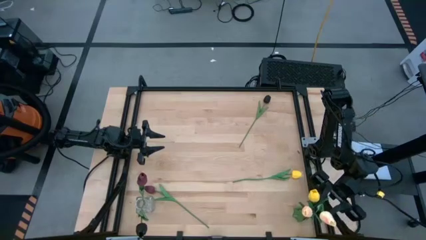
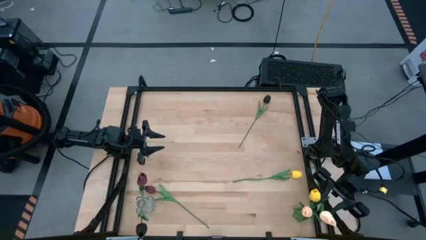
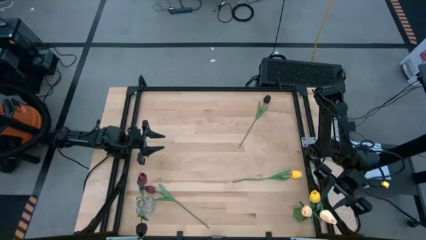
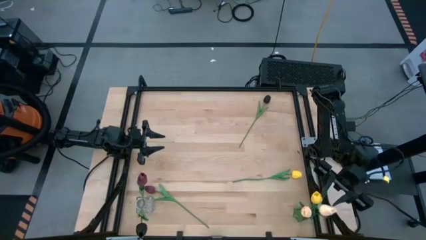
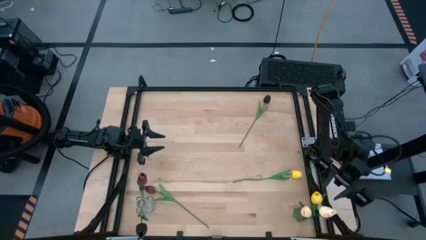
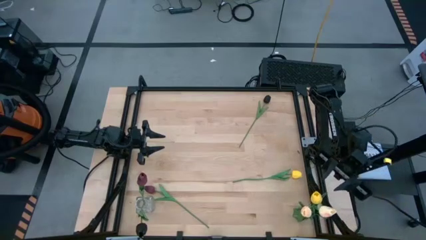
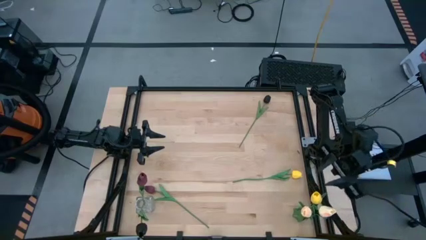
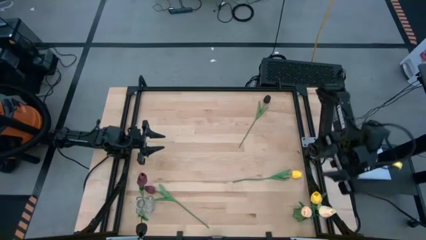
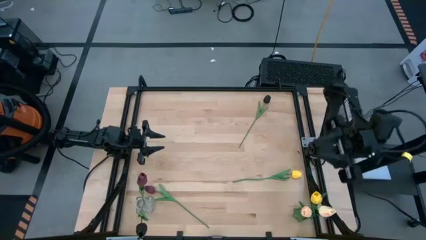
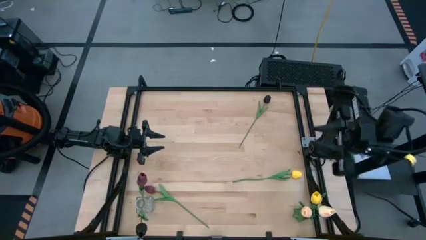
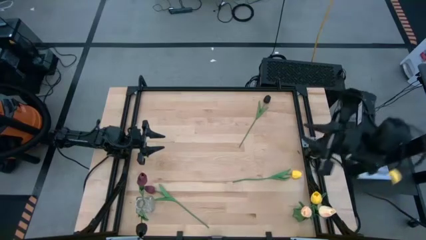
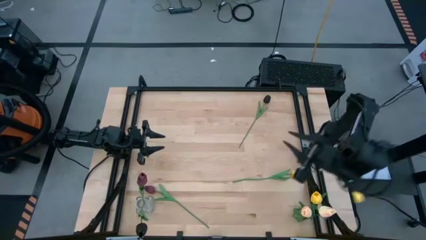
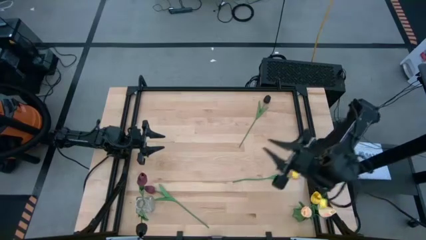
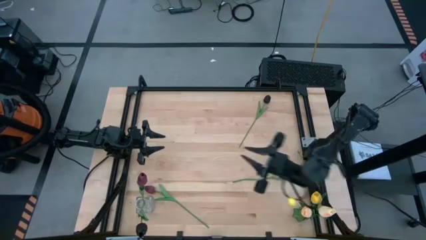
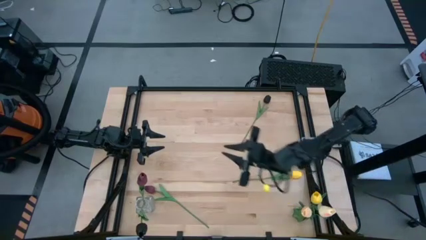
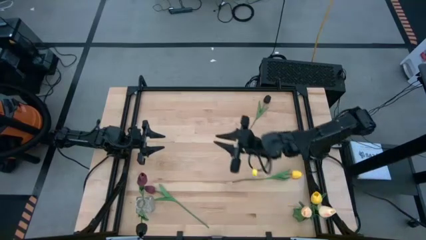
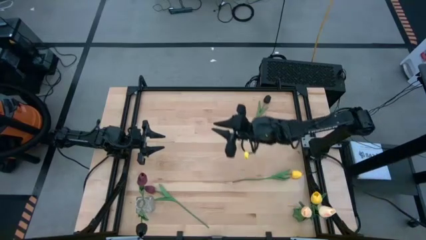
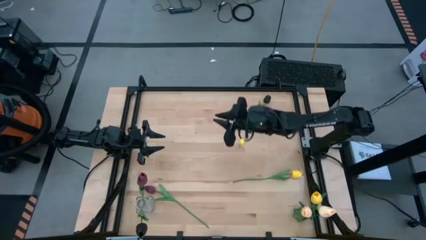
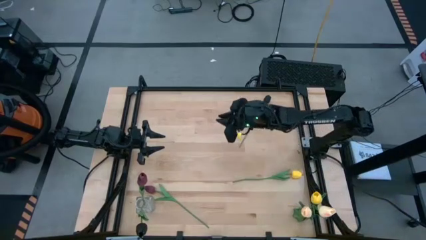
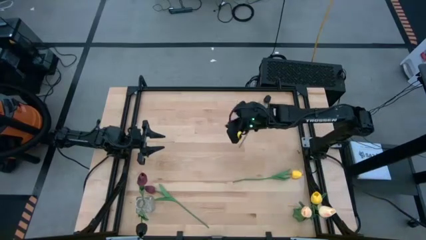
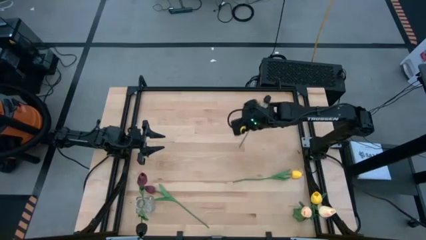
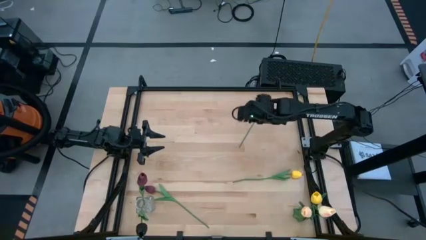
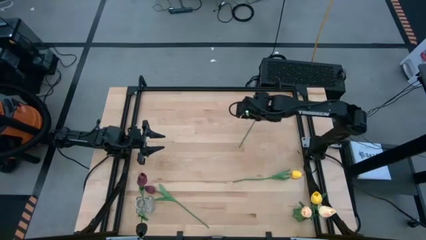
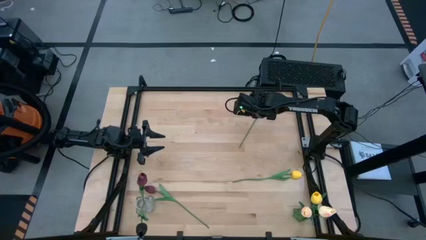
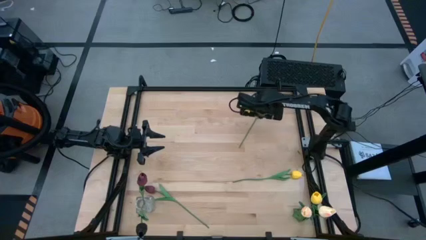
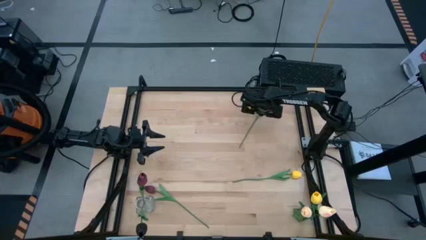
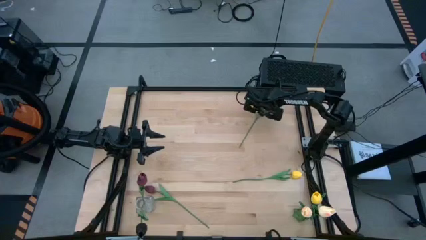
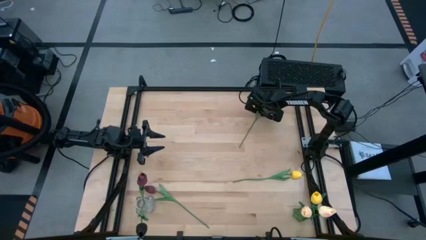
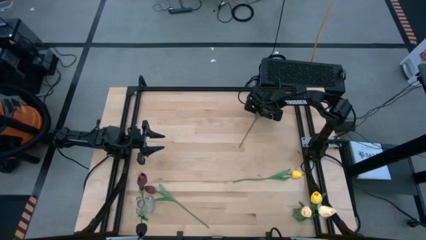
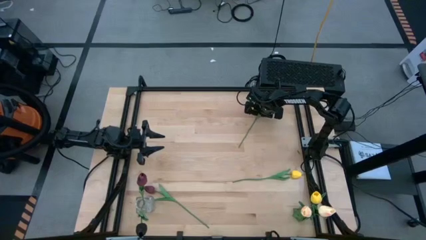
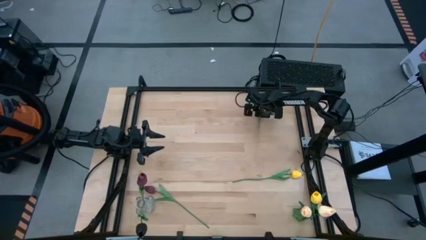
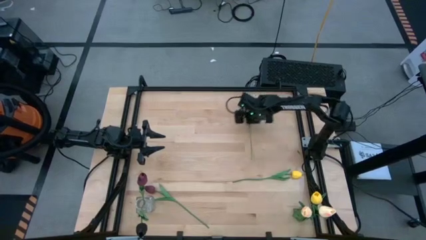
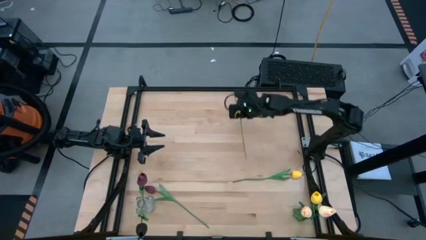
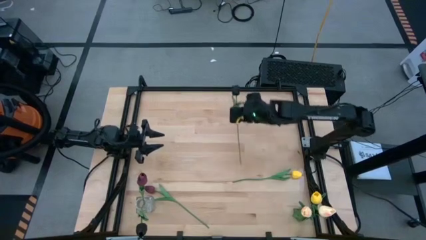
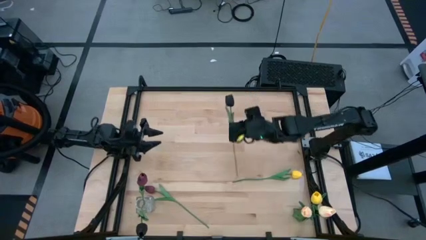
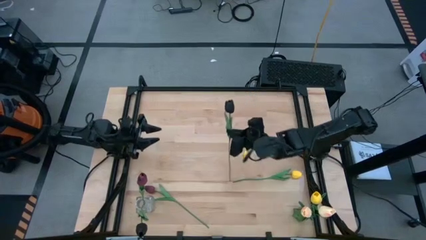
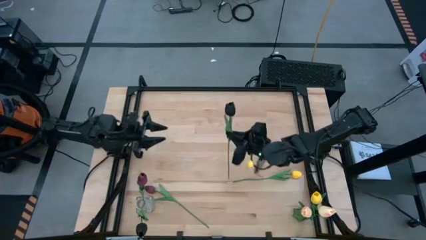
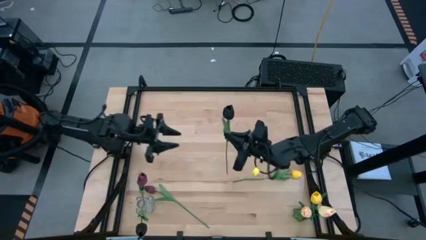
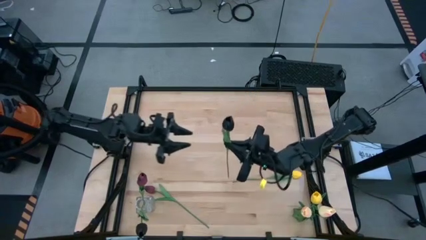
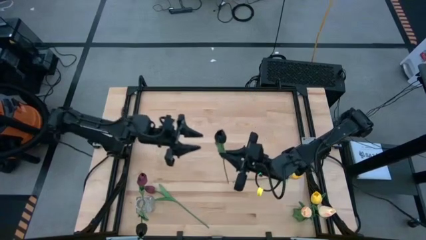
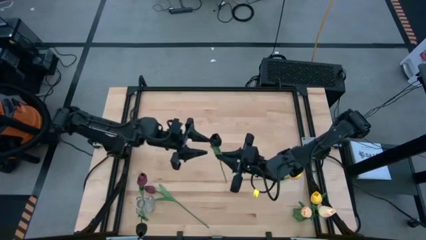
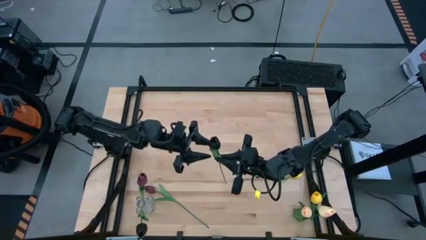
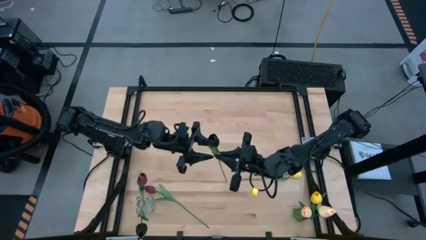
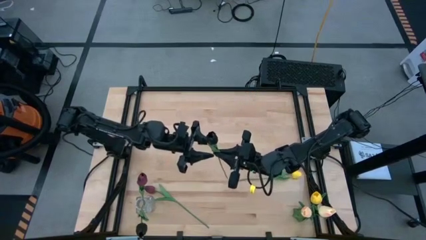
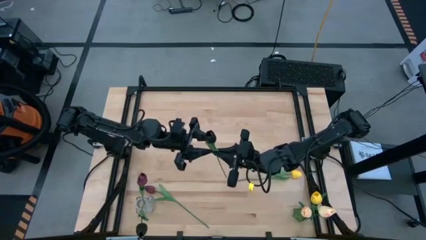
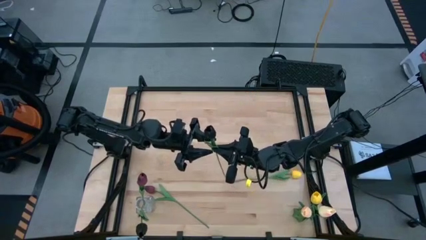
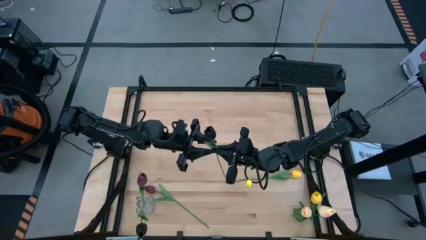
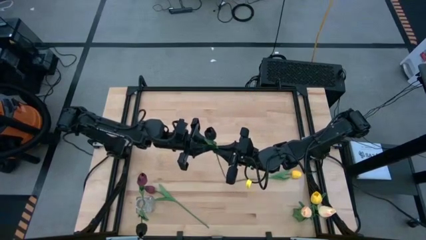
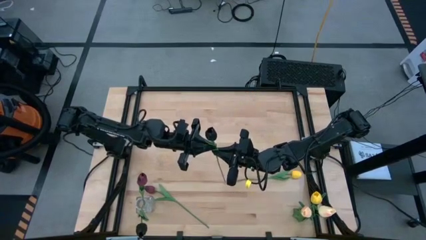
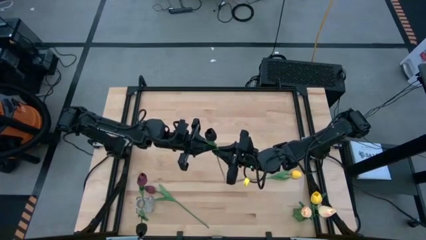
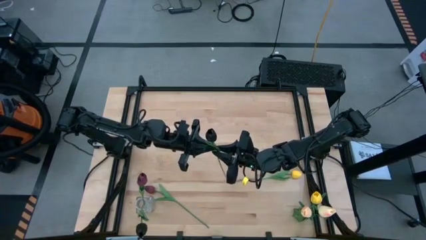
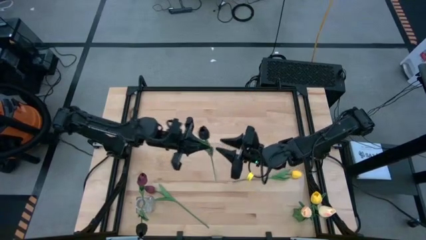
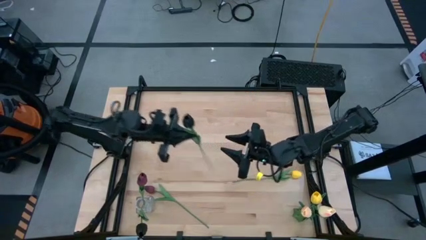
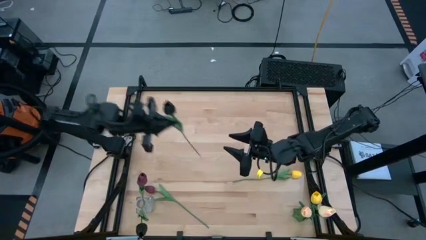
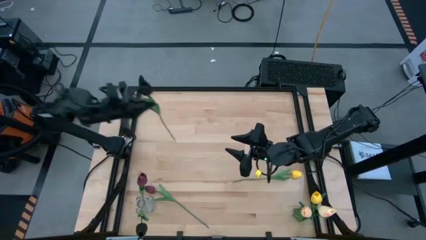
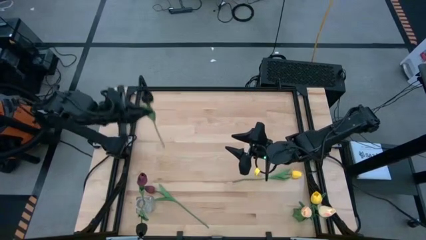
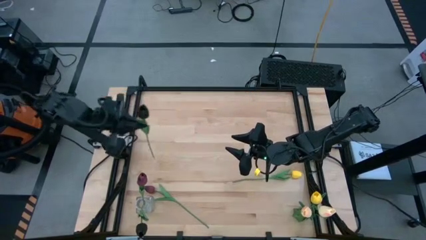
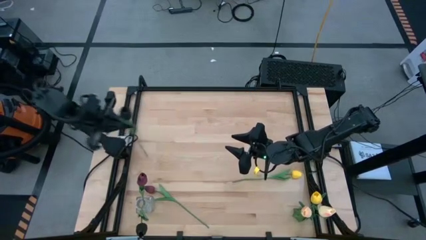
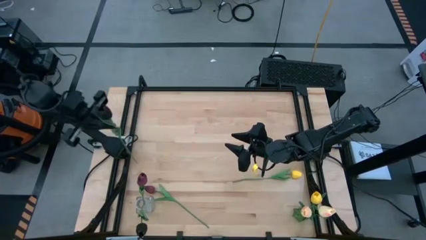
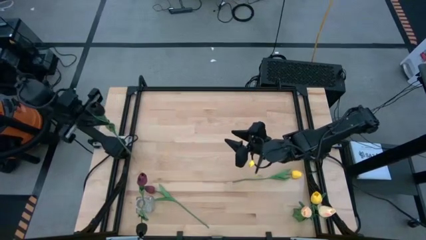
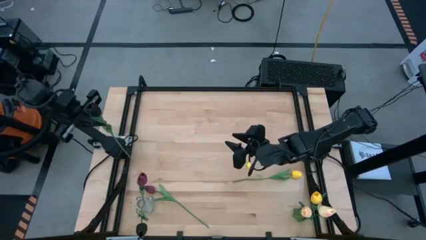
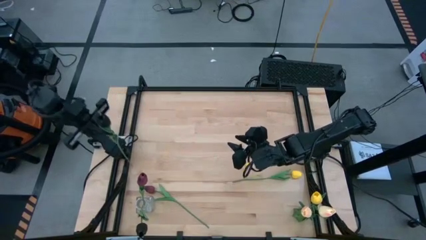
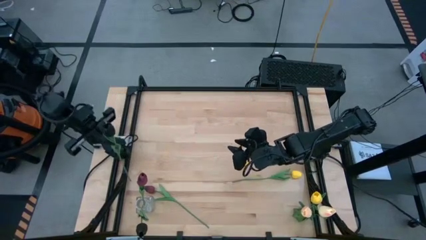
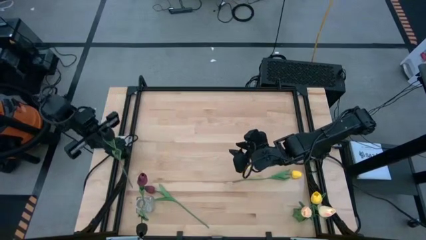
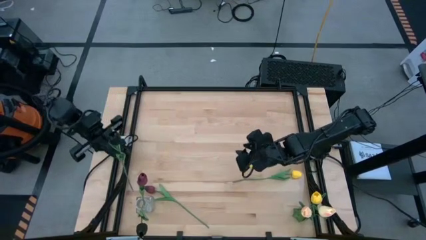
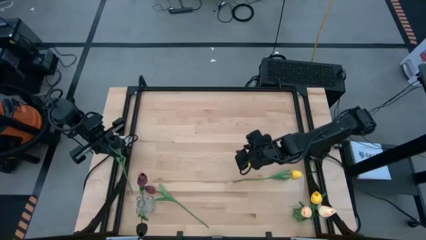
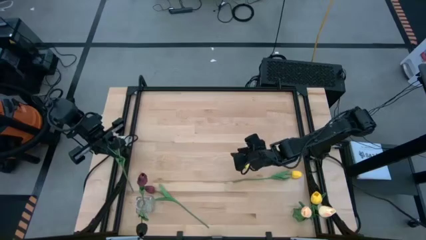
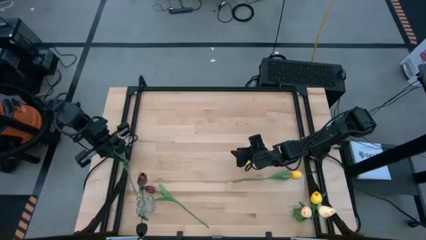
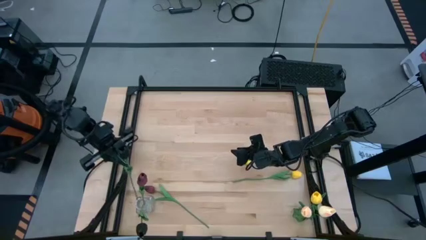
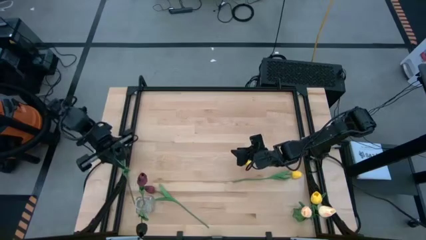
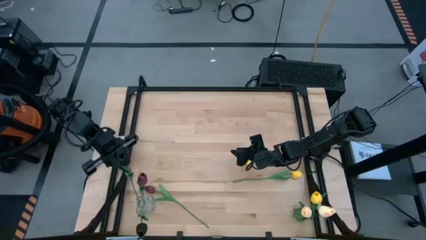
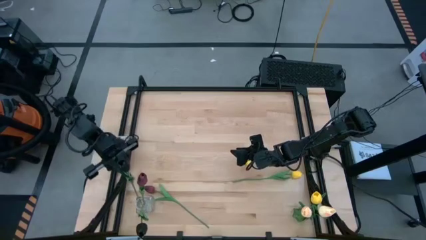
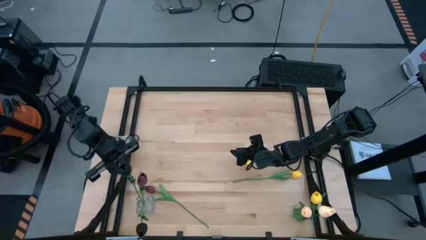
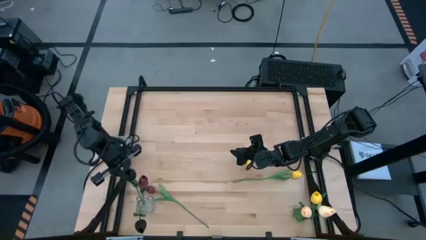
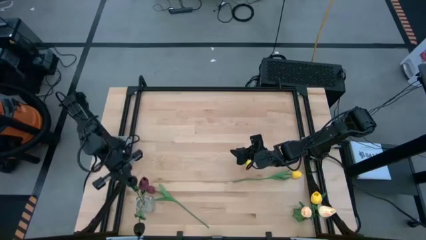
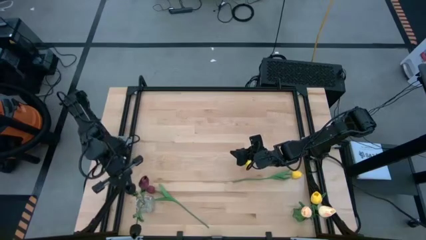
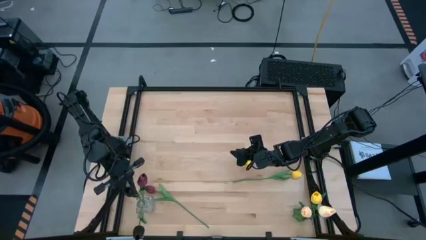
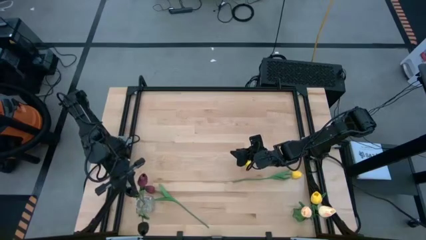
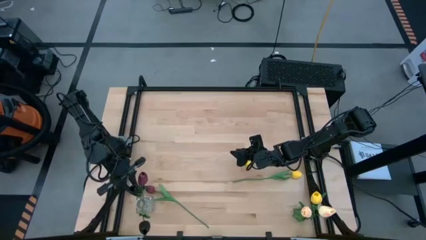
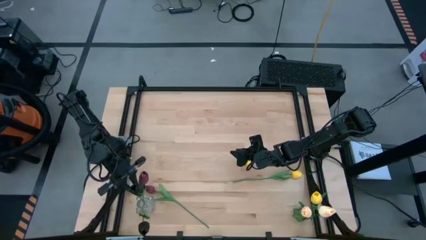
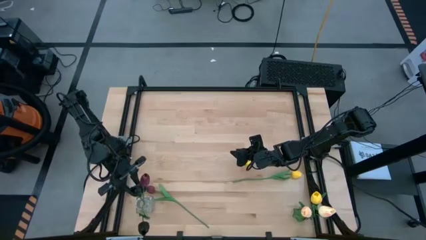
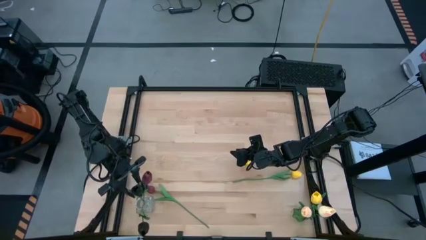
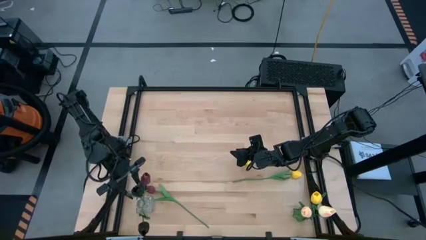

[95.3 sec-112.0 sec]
Task: Sort flowers into vase by color
Put the black tulip into the transparent vase

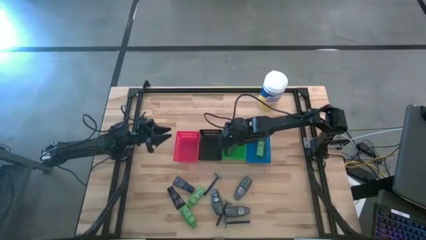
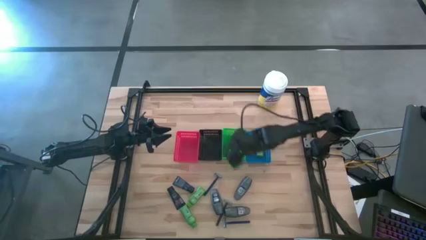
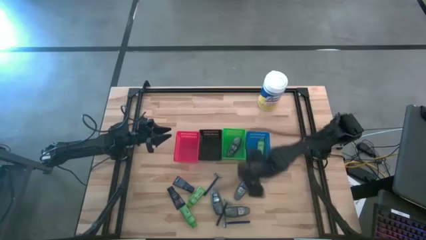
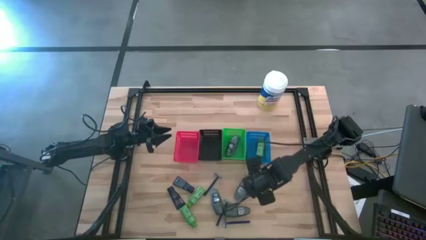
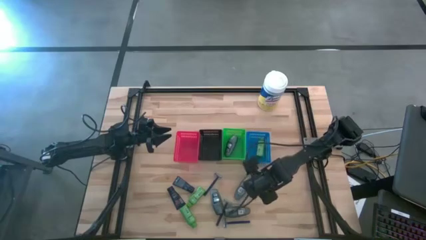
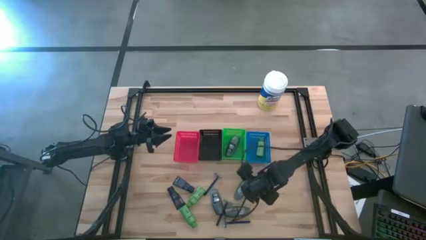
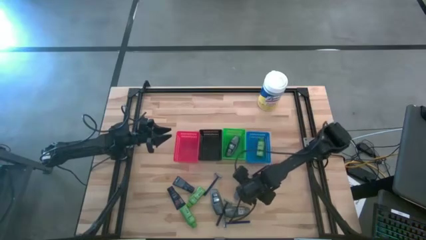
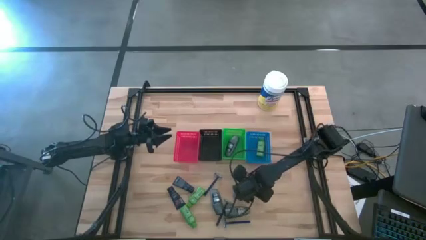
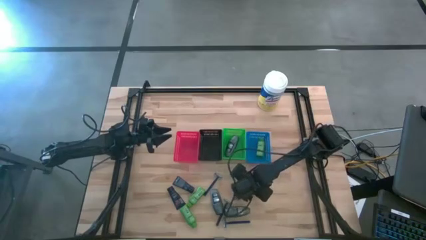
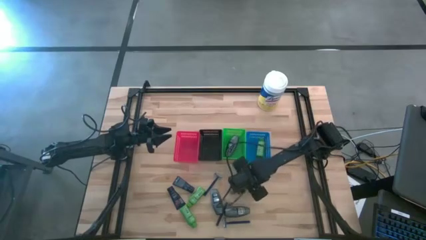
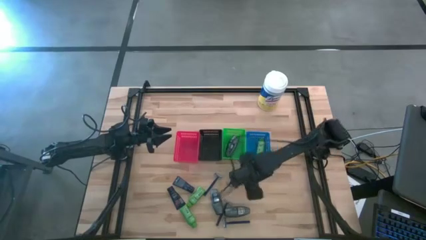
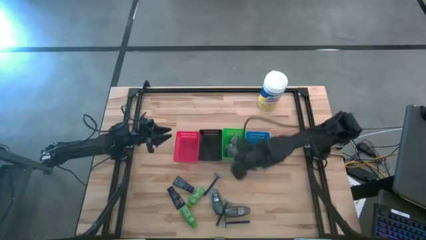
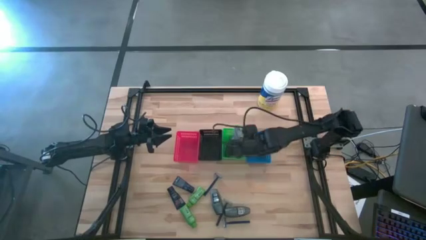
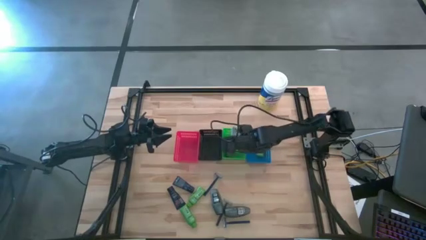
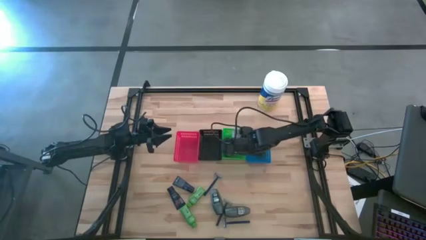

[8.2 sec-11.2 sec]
Task: Pick & Place Travel size toiletries
Put the gray deodorant into the green basket
